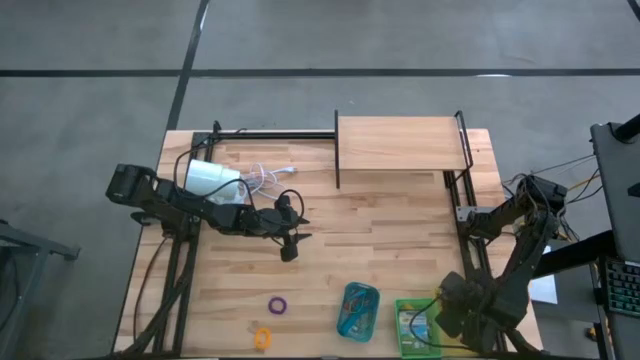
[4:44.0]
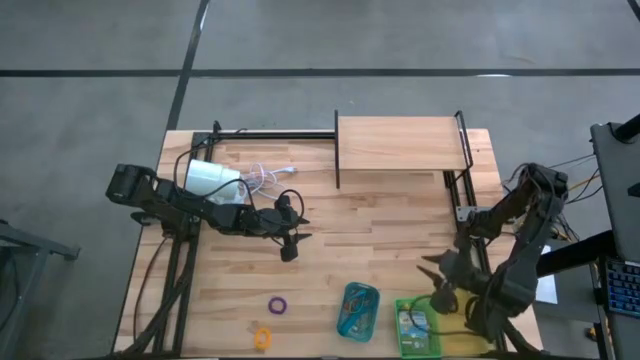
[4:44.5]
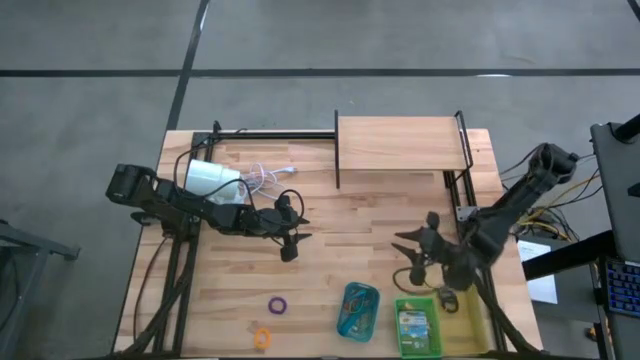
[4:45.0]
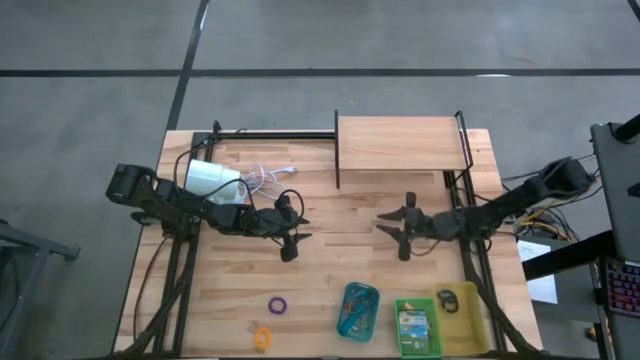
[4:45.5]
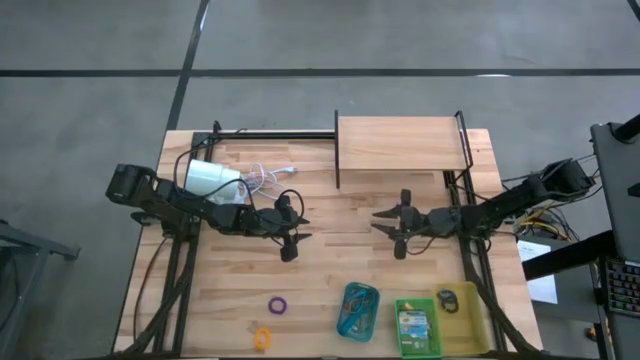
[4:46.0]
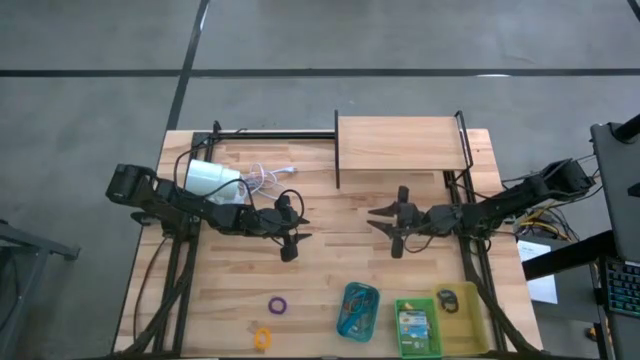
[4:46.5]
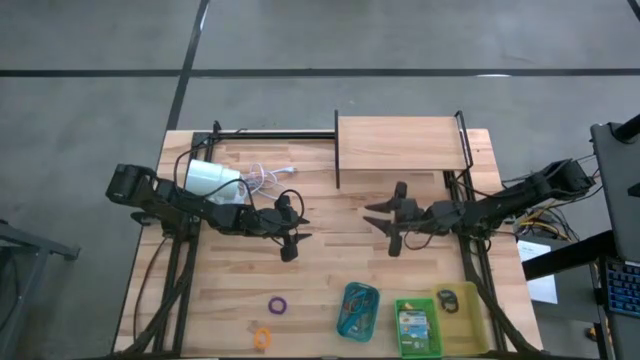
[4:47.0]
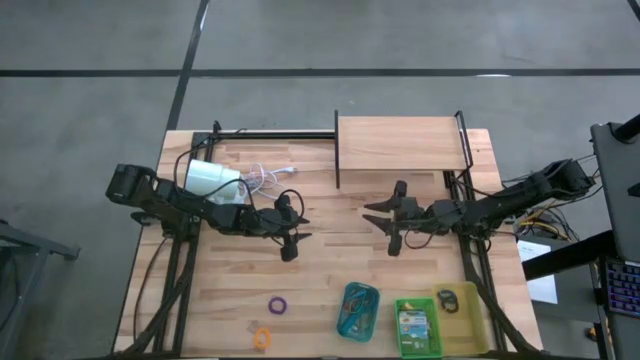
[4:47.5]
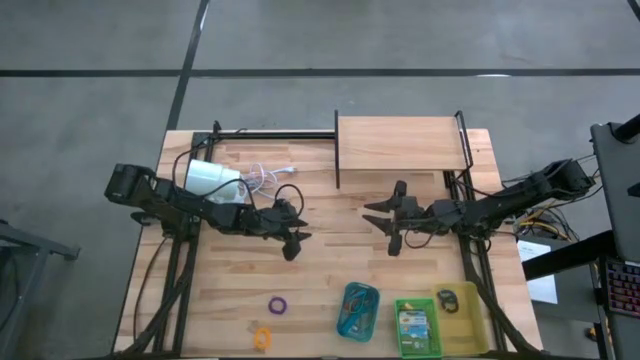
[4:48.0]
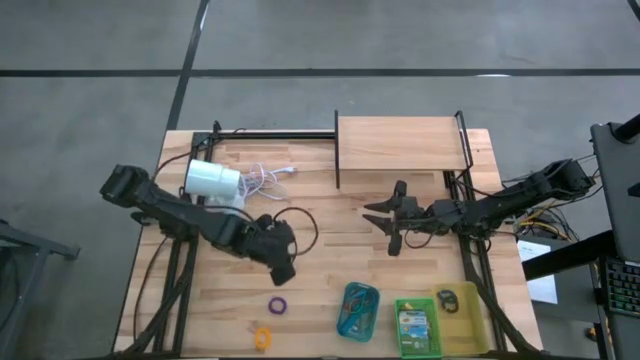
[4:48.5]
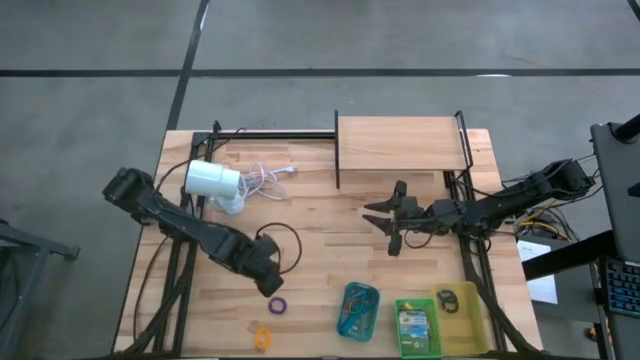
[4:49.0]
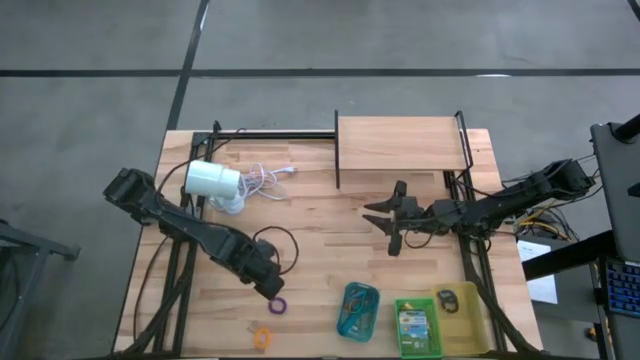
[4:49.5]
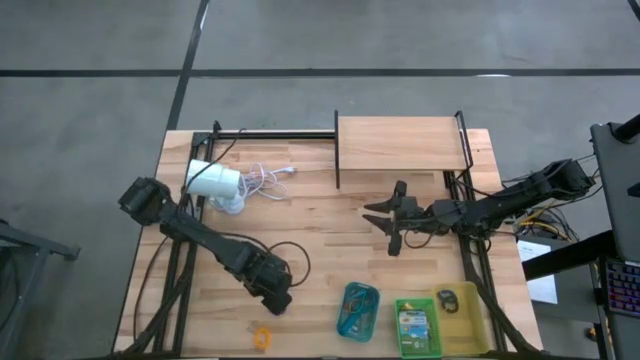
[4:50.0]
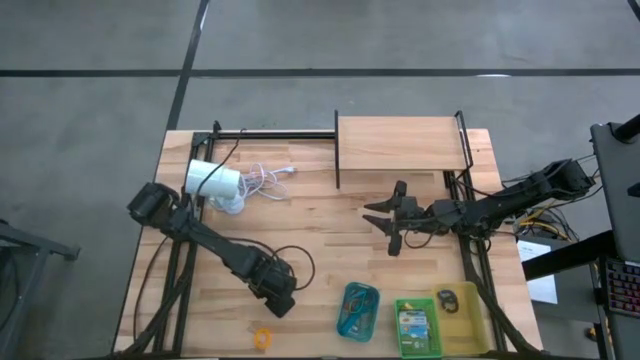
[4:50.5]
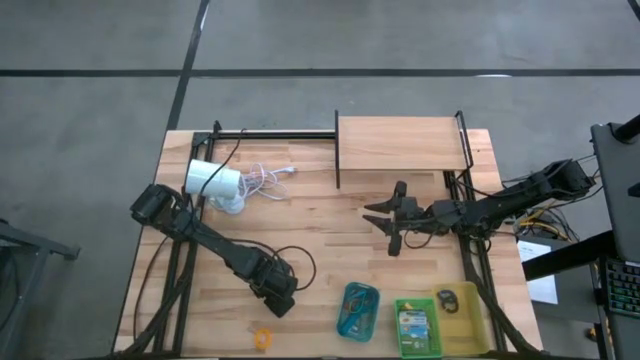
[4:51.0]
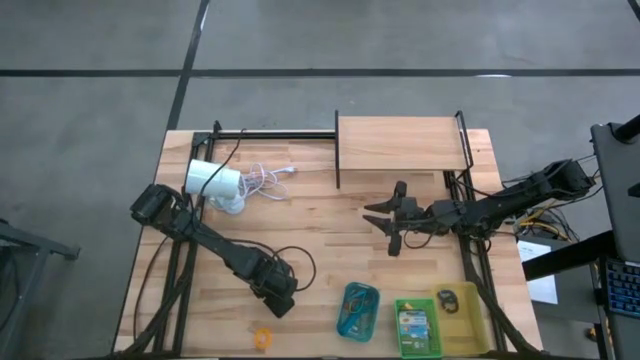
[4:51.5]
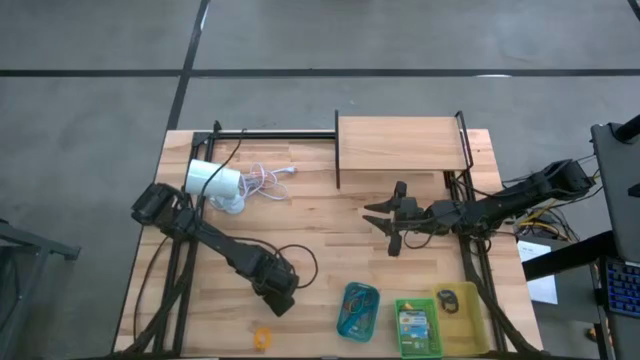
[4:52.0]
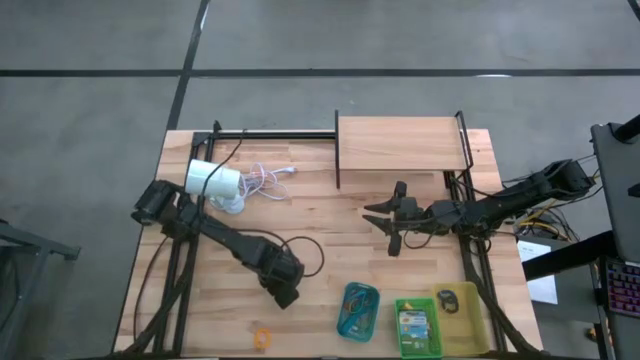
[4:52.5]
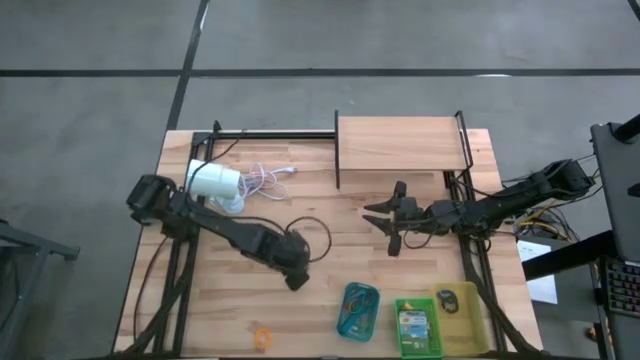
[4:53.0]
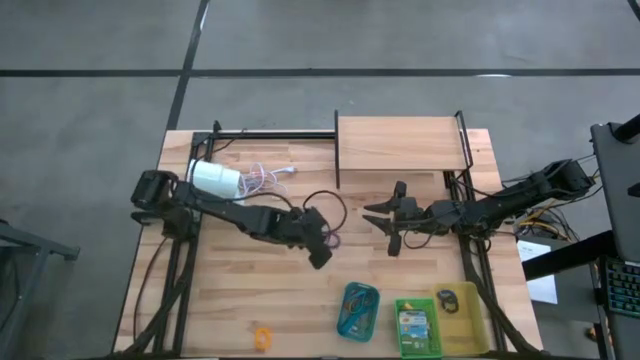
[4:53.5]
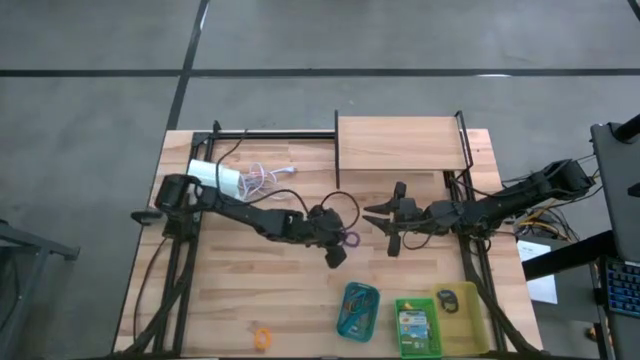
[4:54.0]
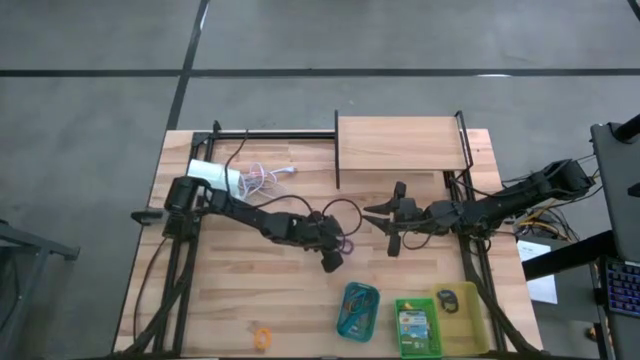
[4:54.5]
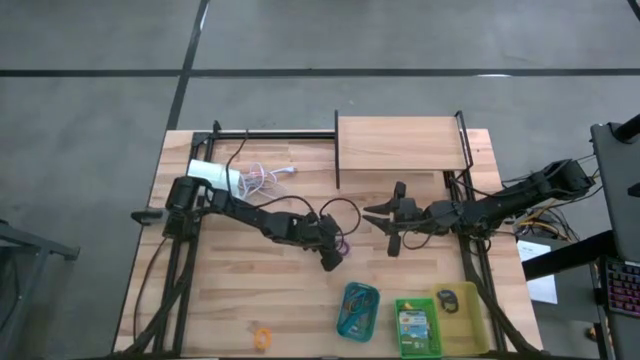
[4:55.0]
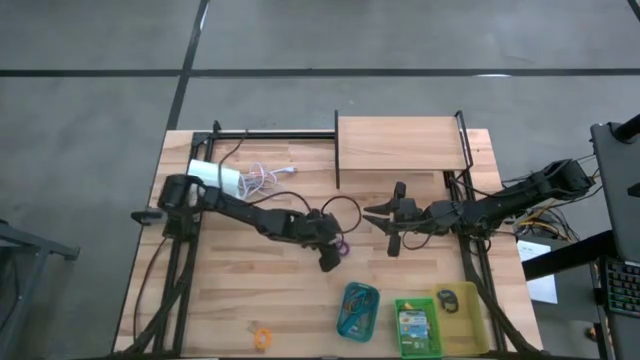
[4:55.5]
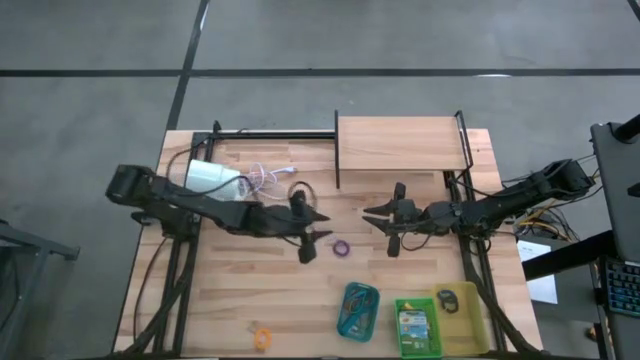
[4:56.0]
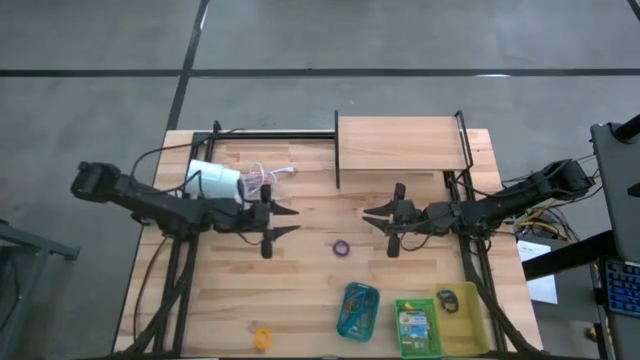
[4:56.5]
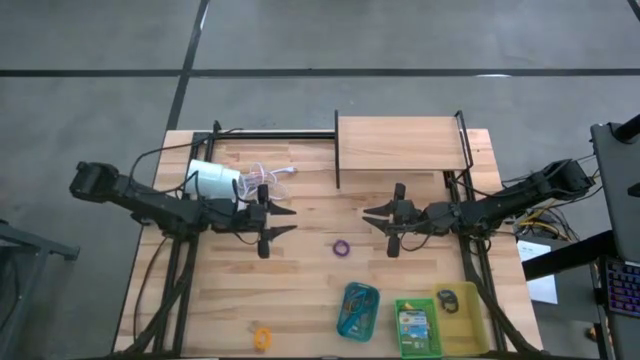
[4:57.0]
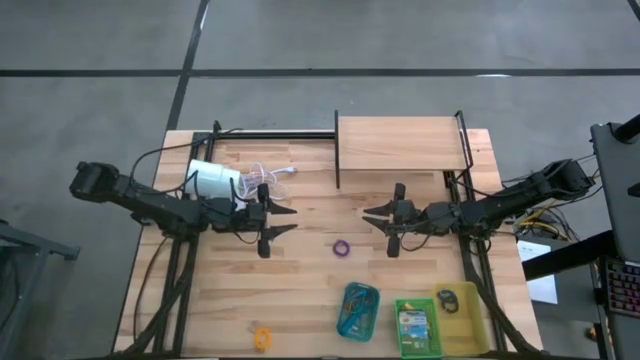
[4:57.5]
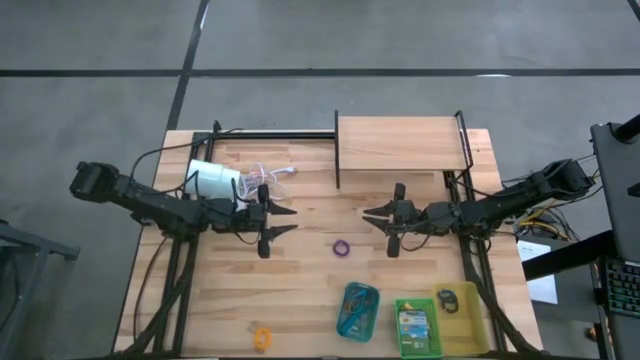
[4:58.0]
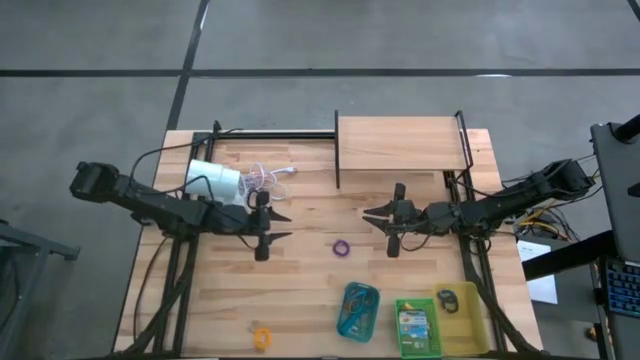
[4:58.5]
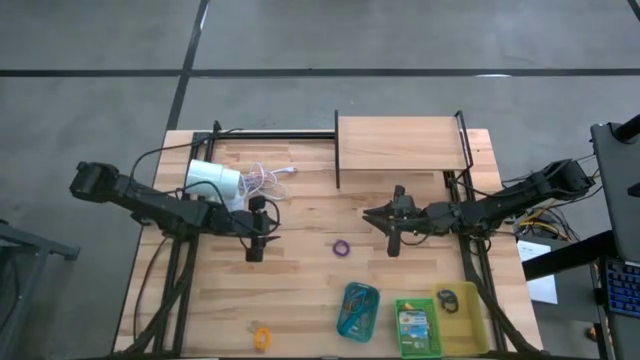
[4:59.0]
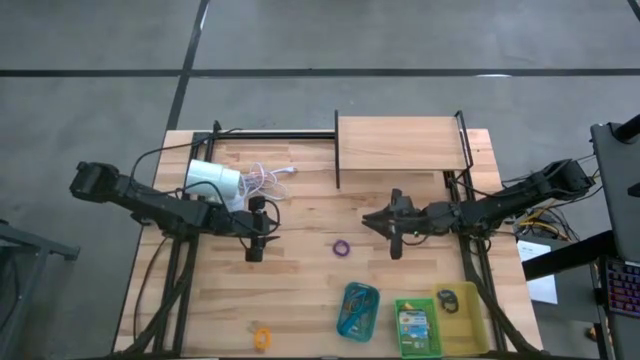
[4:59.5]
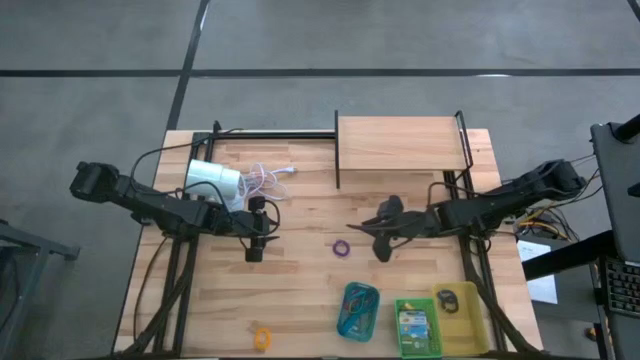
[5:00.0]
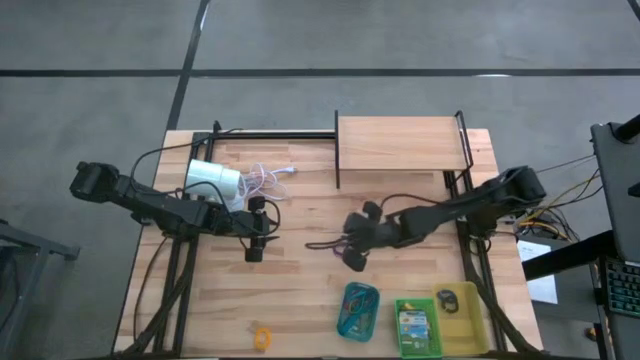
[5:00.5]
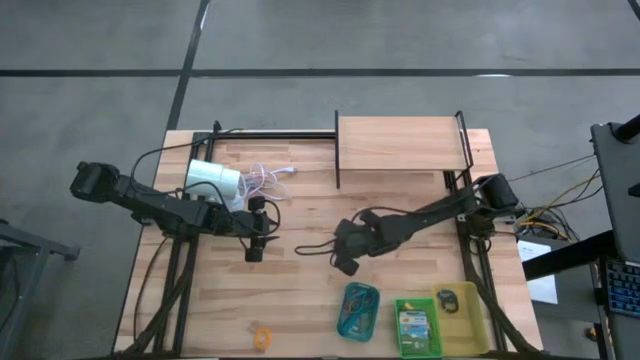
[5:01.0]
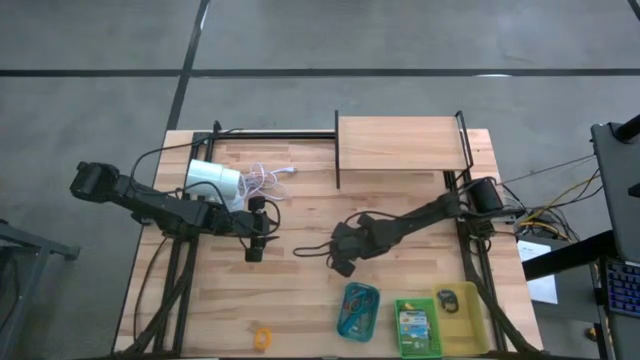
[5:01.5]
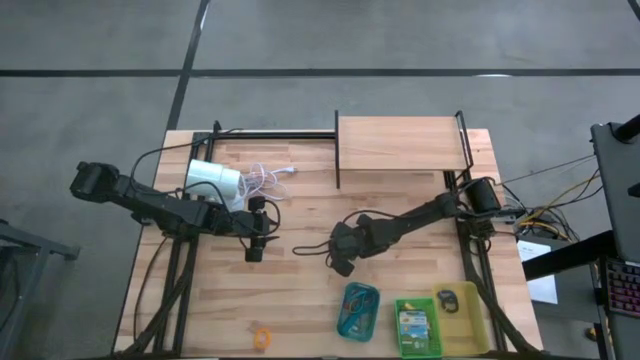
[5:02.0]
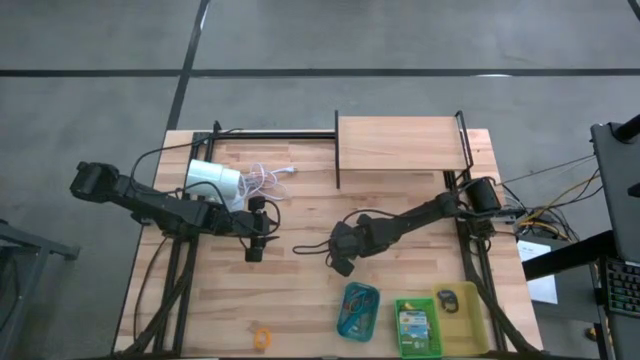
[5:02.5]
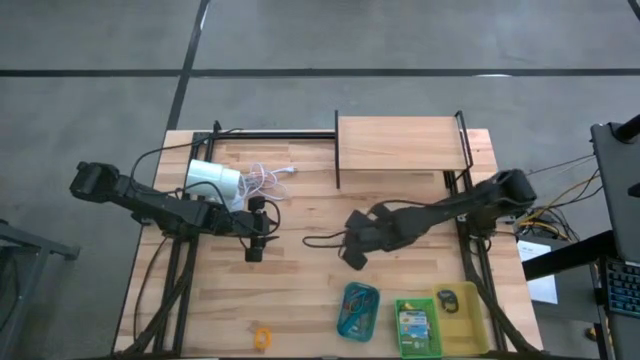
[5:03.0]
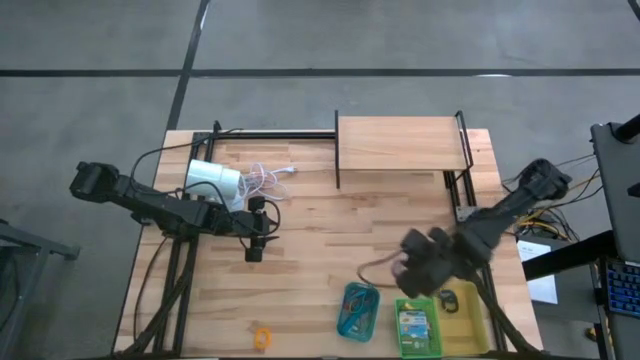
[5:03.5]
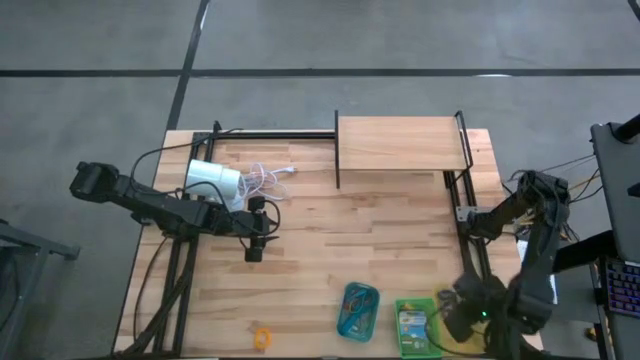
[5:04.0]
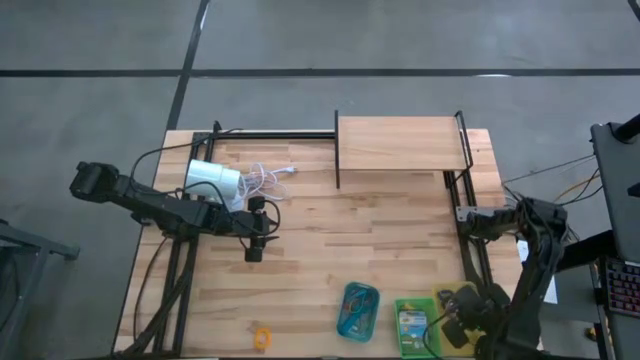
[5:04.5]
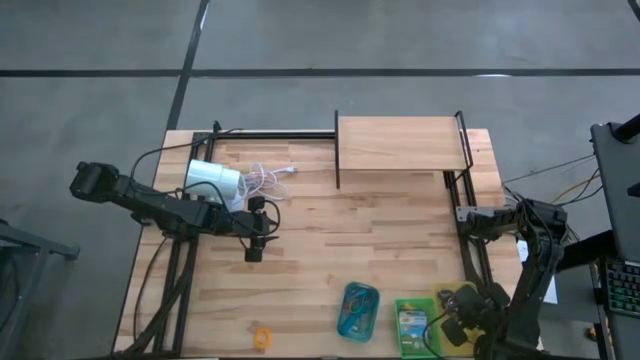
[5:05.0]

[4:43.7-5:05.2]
Task: Pick & Place Office Desk Supplies
Put the violet spring rubberband into the yellow bin
